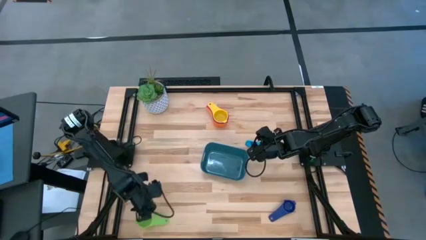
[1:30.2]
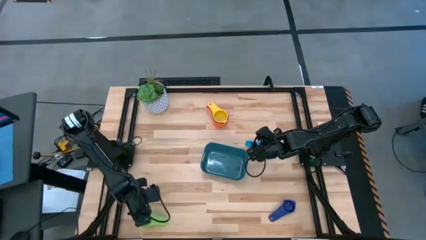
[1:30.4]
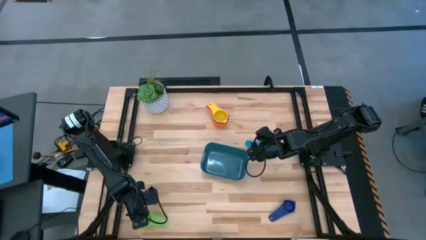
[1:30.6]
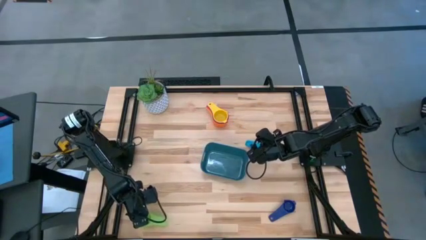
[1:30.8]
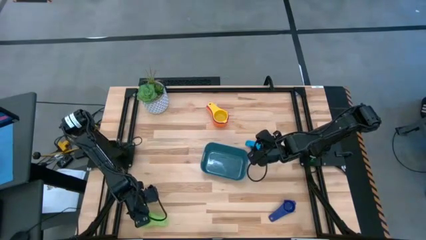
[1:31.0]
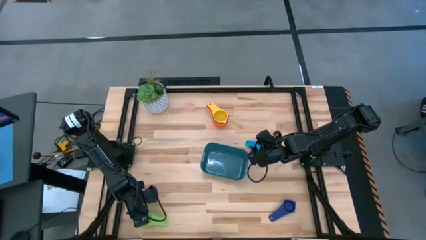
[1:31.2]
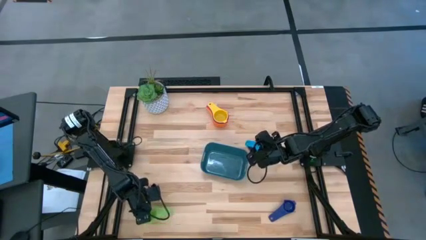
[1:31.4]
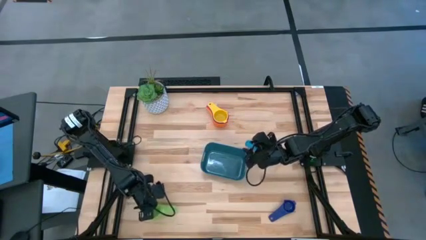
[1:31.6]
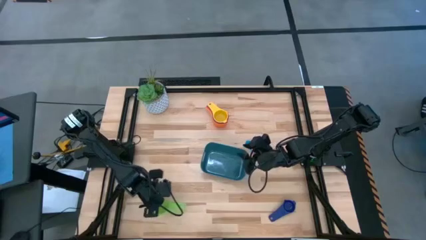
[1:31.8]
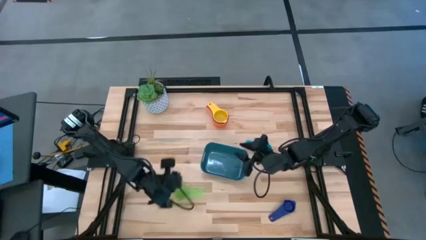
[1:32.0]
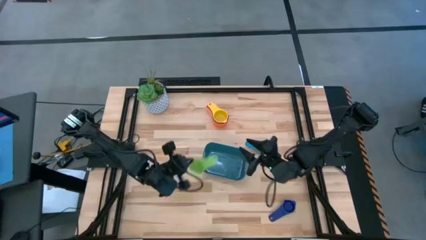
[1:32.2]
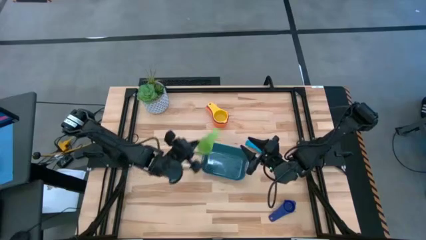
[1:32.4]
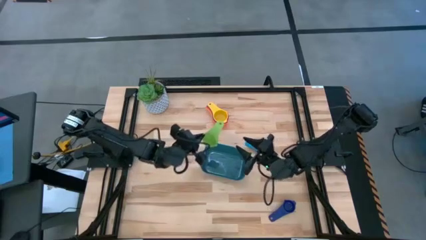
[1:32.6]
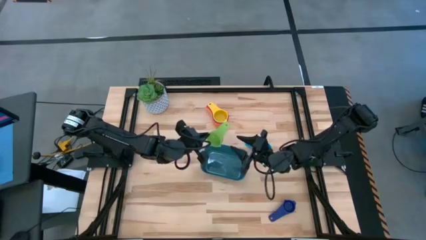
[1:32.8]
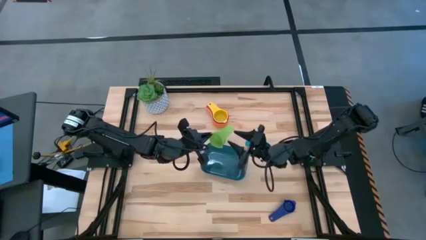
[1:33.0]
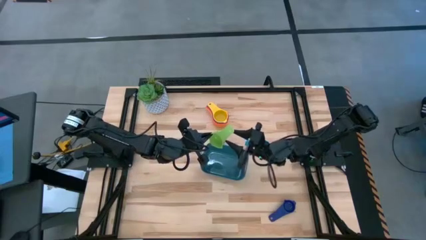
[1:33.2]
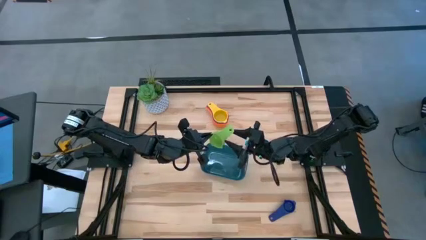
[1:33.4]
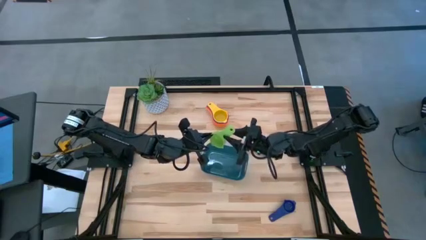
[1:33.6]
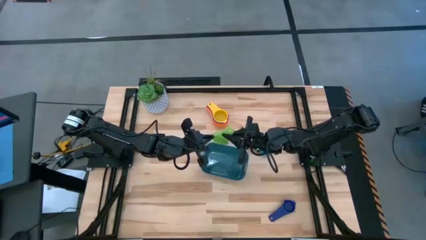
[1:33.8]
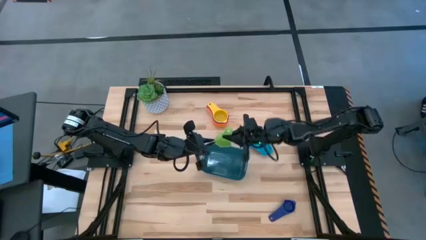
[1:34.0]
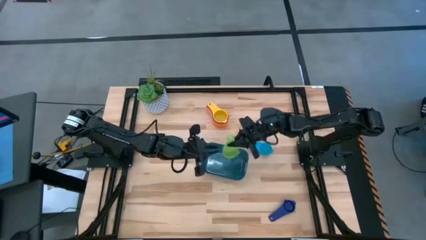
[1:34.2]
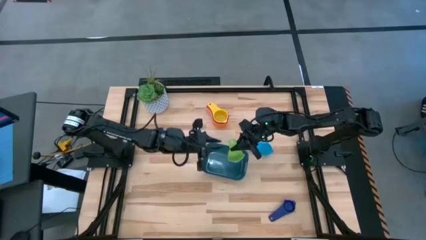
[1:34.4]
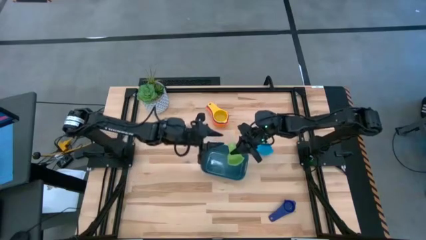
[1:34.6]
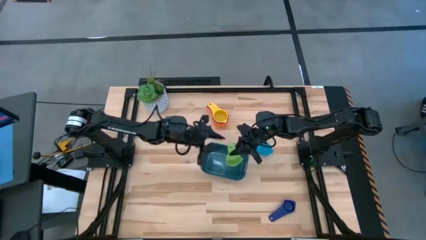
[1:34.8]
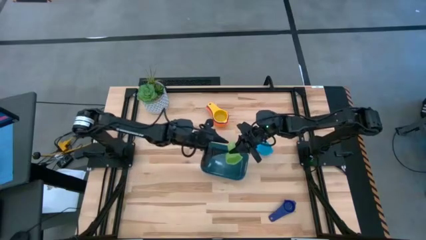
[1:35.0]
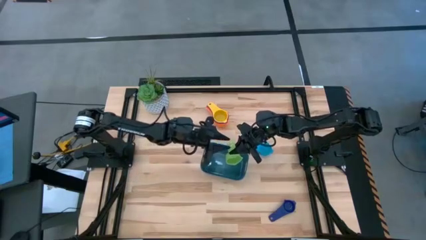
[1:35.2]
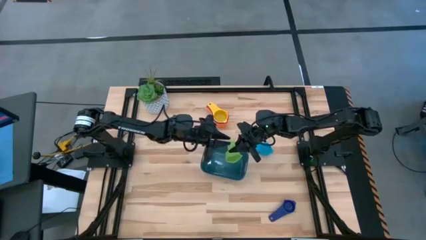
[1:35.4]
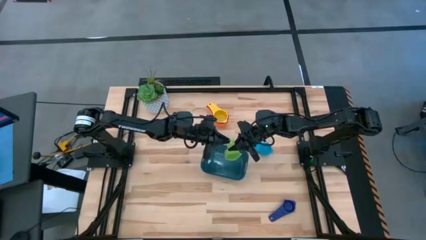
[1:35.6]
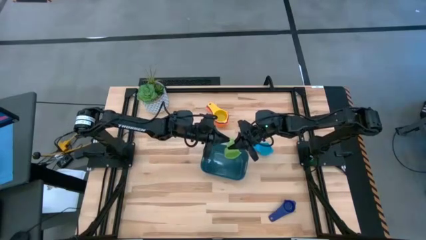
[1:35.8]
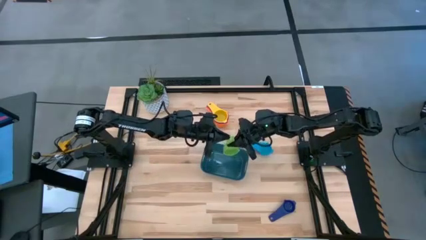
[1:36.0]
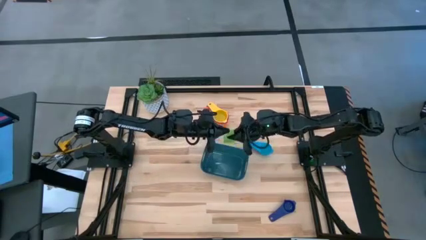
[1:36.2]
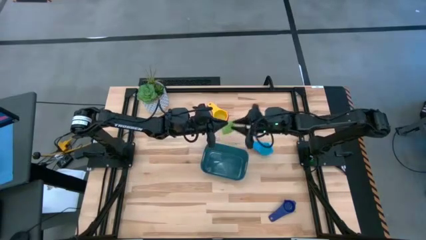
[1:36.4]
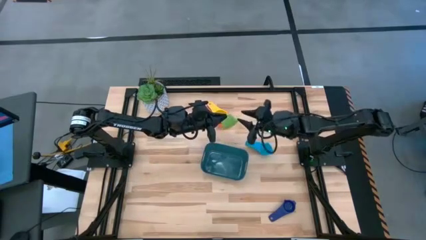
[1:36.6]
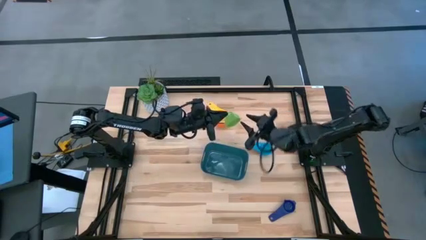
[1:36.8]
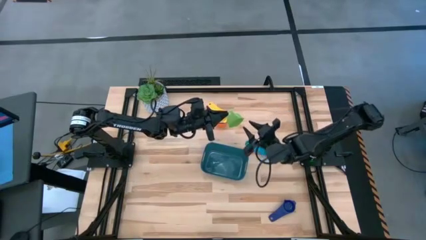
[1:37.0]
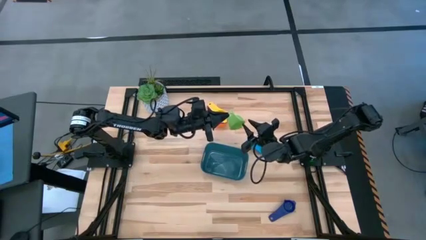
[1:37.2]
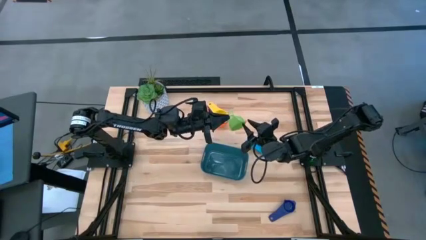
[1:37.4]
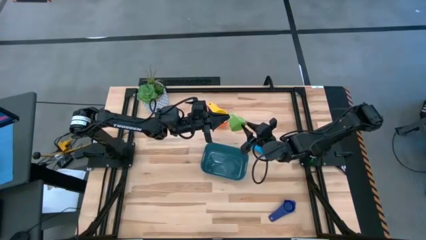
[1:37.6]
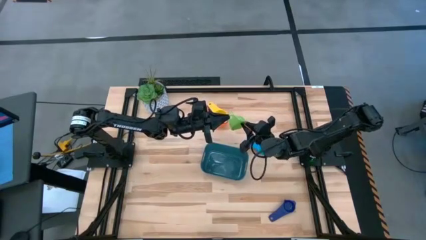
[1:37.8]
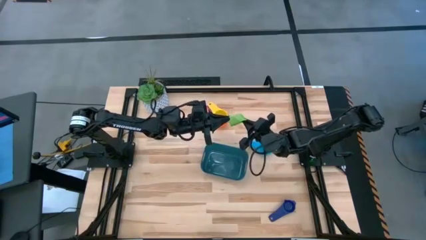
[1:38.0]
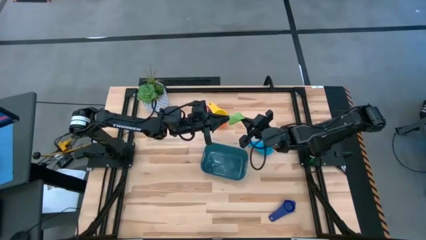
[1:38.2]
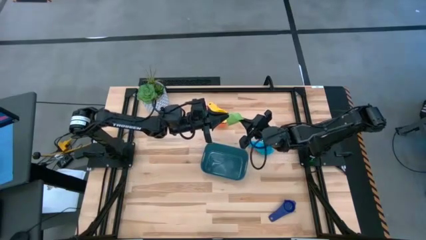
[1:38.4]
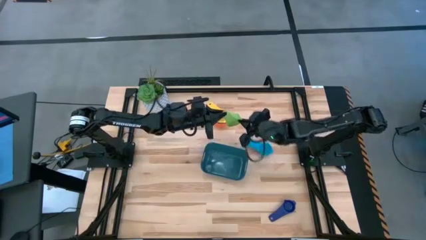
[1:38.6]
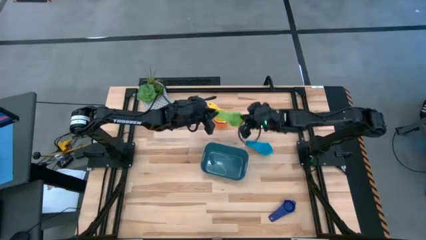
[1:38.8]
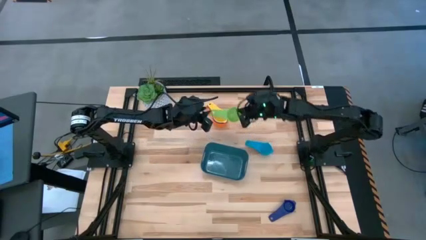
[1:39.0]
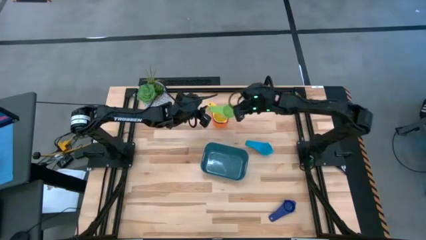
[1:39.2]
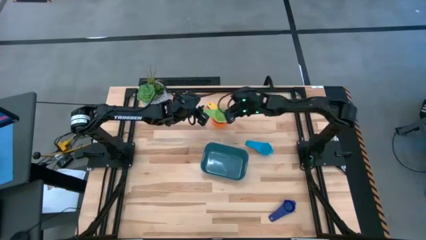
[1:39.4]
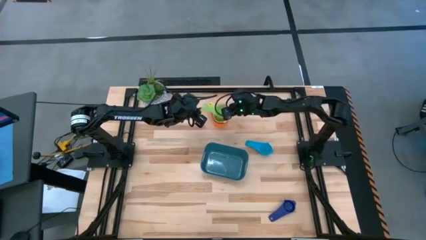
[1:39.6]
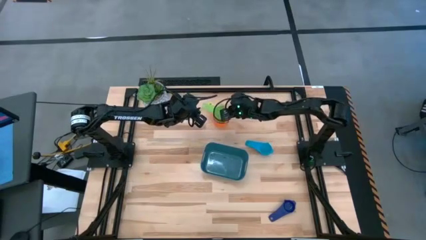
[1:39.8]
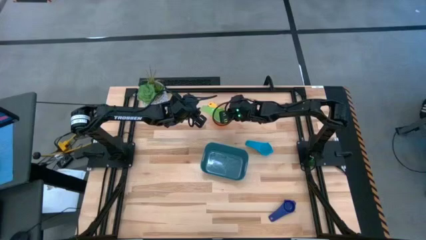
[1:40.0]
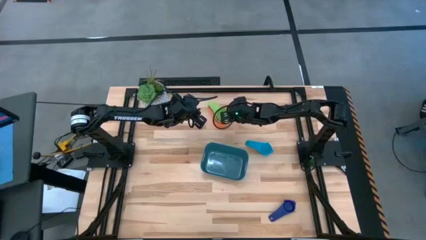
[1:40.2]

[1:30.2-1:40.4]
Task: Nest measuring cups in basket
Stack the green measuring cup on top of the yellow measuring cup

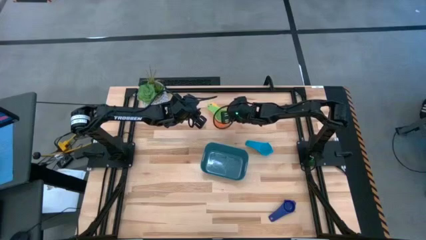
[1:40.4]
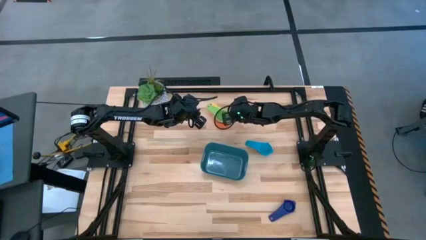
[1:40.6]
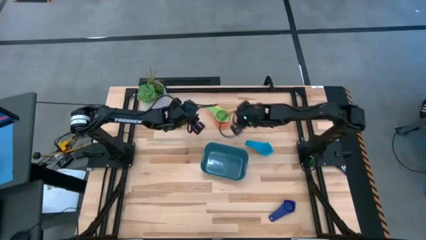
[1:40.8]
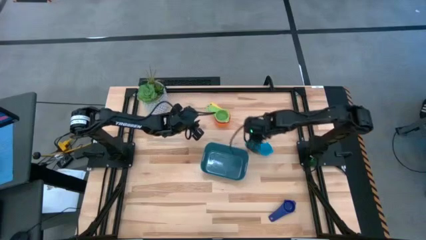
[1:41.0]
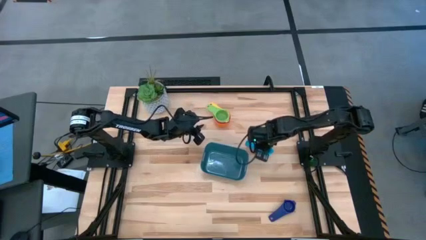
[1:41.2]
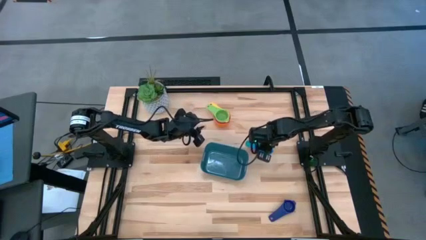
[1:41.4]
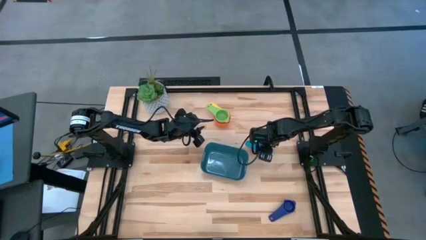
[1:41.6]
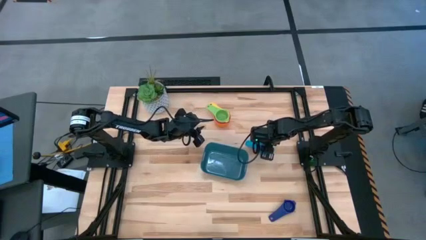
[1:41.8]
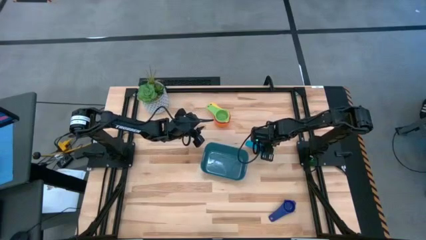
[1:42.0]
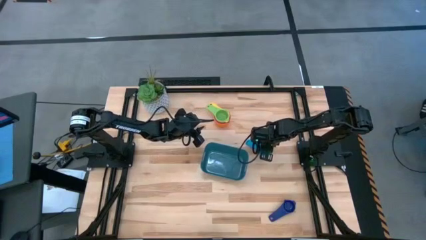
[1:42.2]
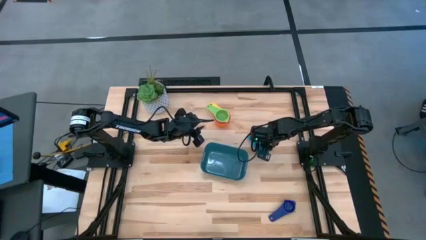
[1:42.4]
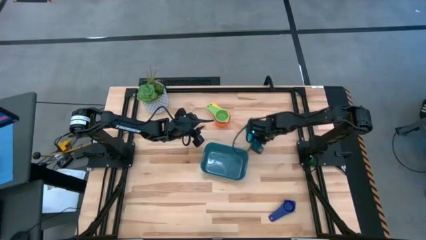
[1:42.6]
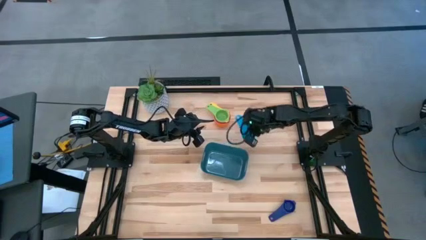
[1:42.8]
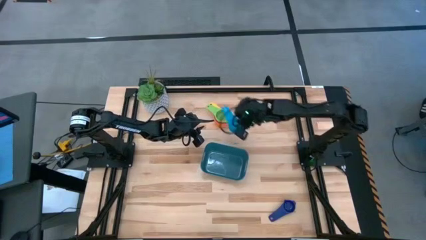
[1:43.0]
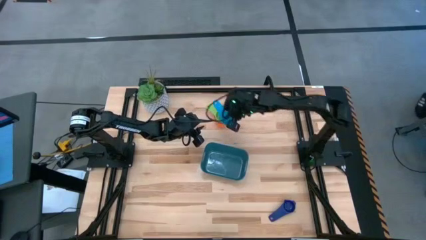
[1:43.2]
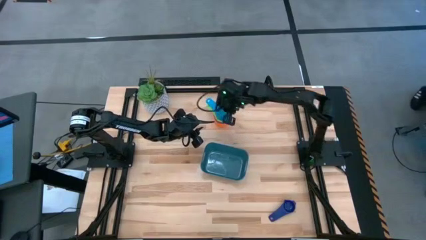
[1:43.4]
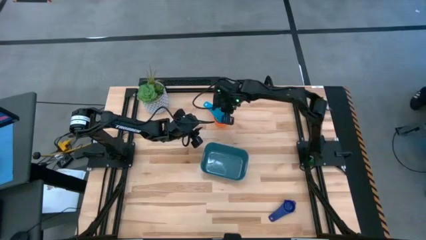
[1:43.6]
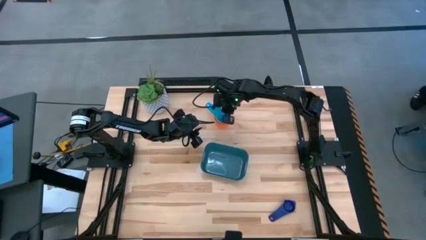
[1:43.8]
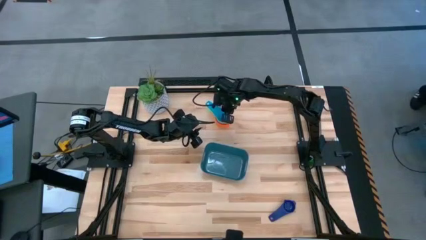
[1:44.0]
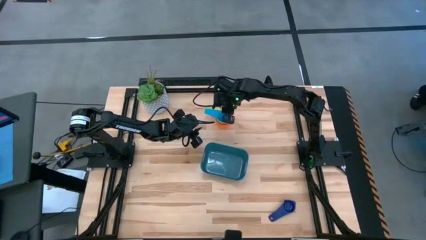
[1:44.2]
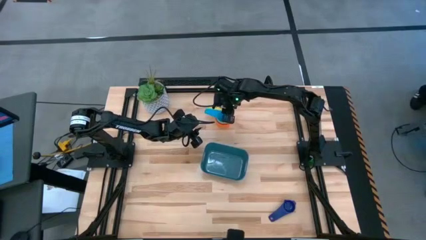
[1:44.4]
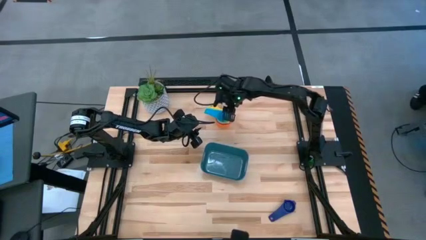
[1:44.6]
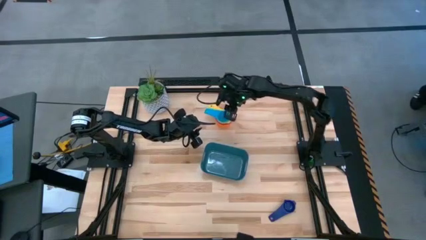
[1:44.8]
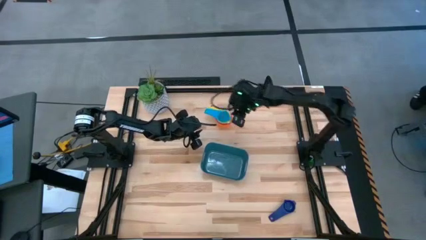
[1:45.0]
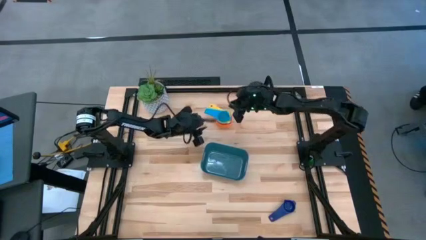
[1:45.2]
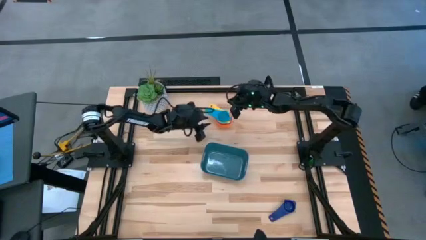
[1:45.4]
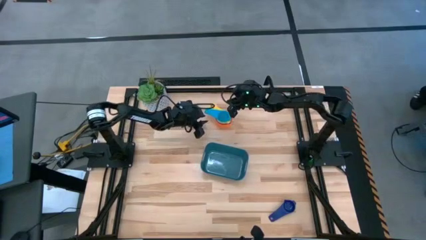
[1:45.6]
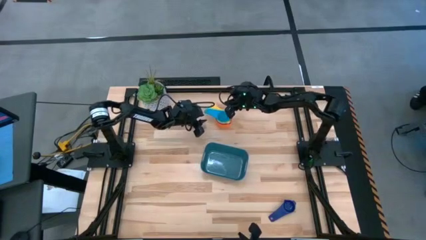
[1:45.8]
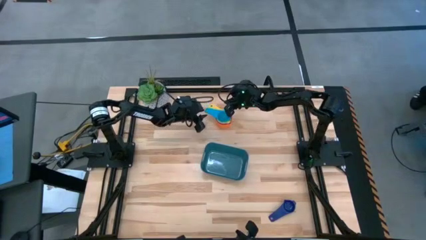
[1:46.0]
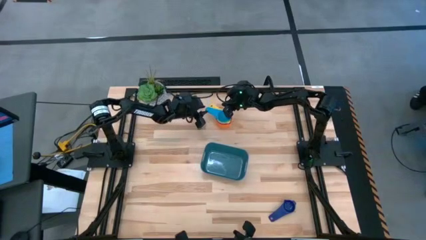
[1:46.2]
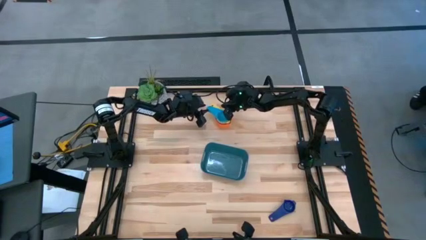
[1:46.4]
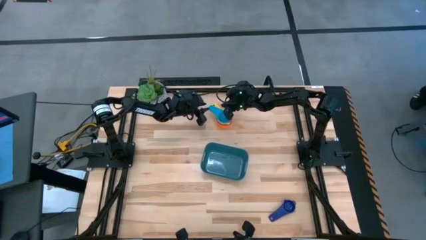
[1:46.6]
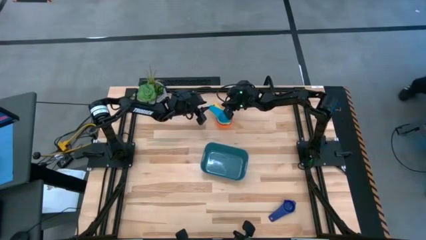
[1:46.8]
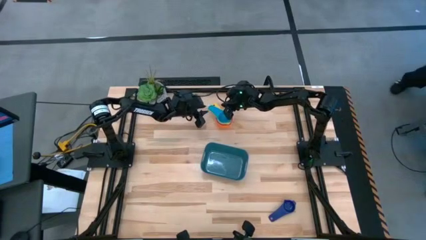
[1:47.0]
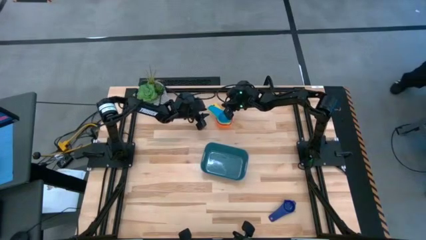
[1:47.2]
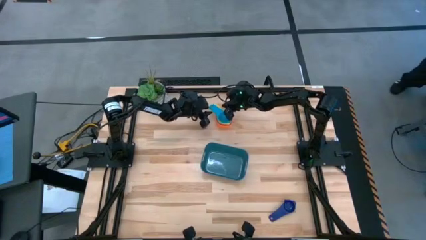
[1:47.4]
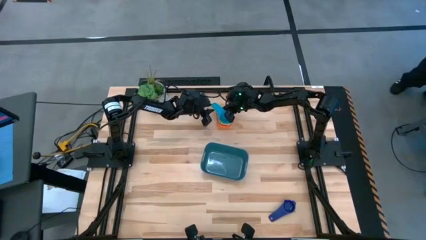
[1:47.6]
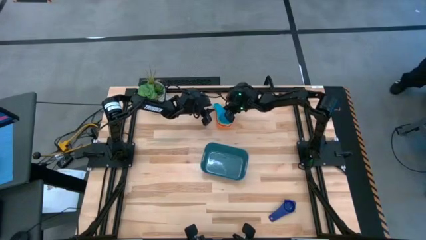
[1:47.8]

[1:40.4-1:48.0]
Stack the light blue measuring cup on top of the green measuring cup

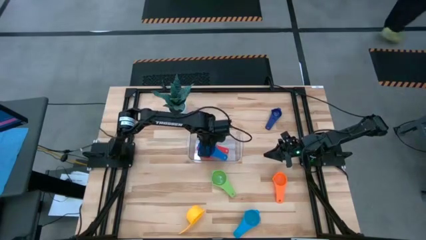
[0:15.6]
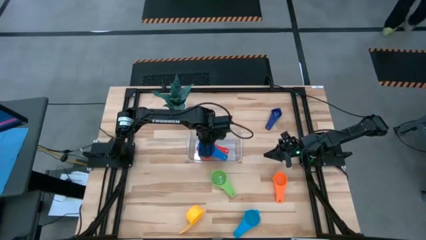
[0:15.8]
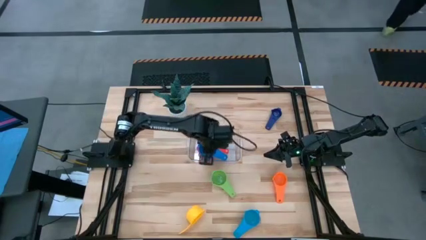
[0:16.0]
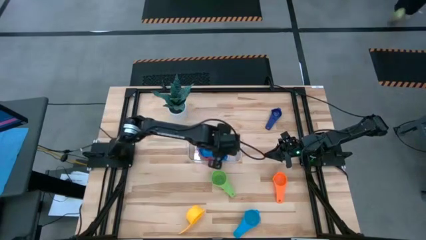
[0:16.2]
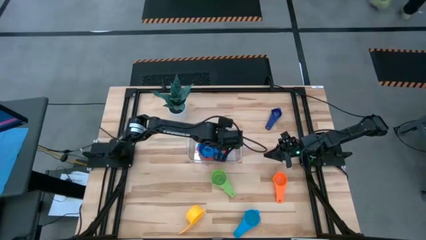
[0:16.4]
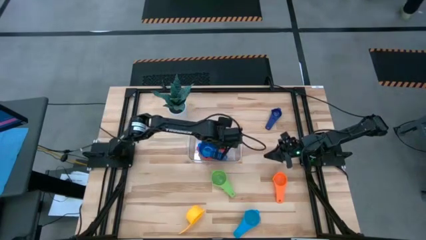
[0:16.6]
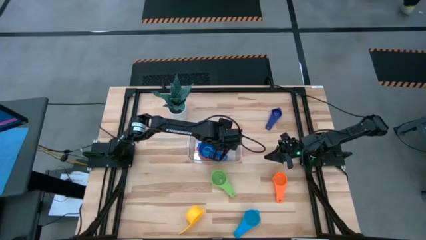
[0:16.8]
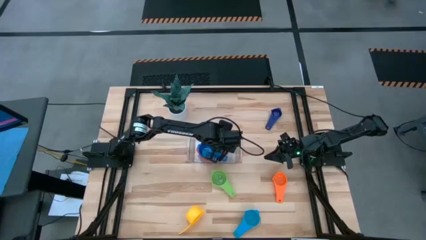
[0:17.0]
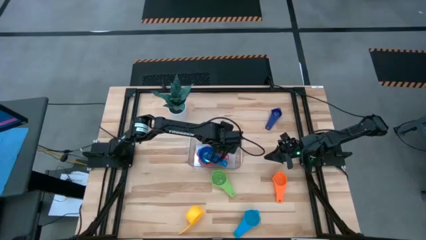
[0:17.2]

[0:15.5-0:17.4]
Task: Nest measuring cups in basket
Adjust the transparent bin
